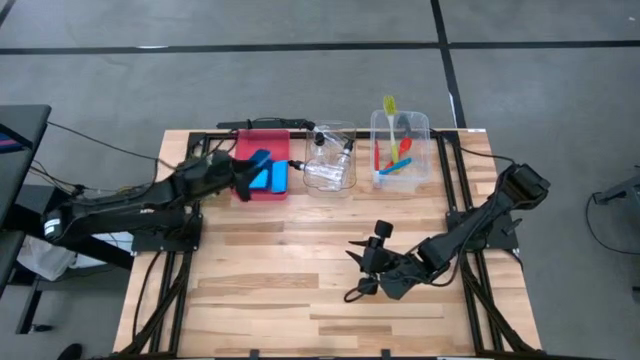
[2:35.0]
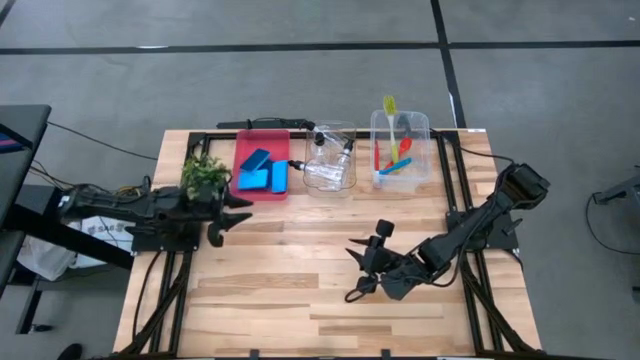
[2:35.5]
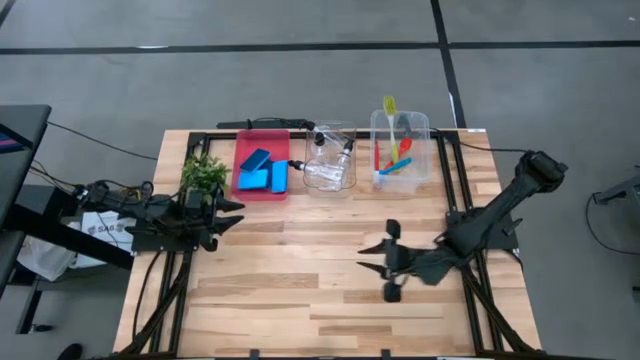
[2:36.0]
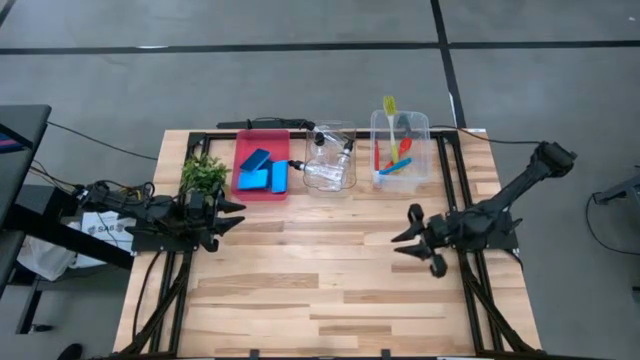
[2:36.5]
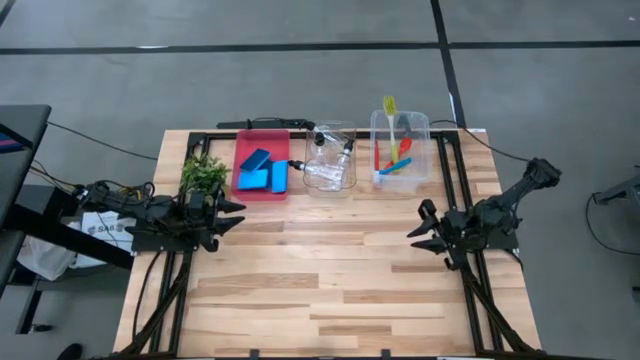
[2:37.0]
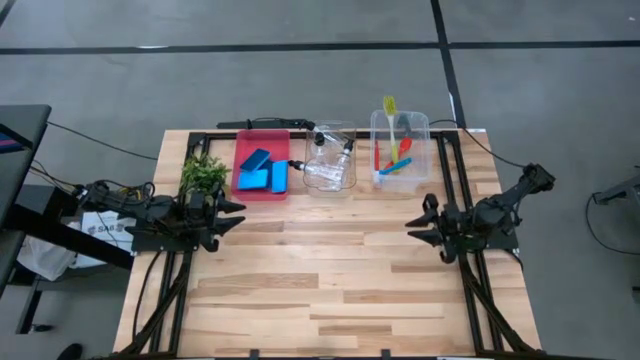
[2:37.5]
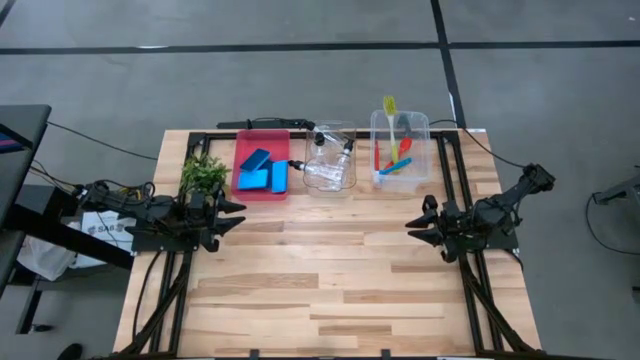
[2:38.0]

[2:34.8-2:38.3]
Task: Pick & Place Kitchen Sink Supplies
Return to Home Position

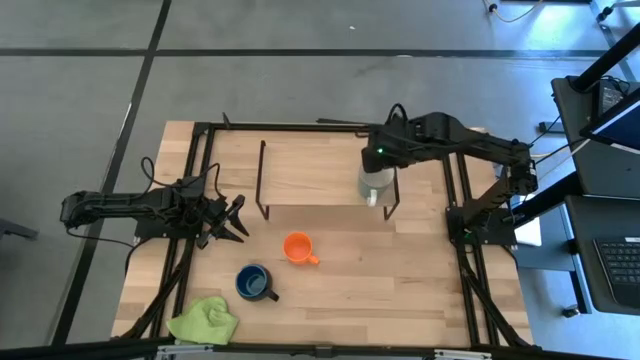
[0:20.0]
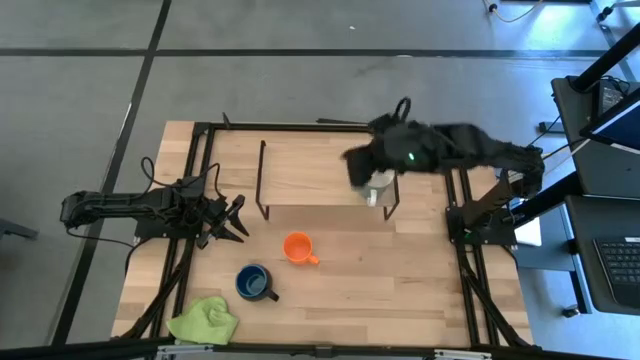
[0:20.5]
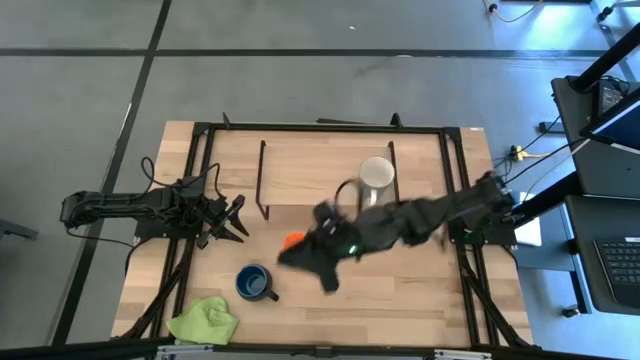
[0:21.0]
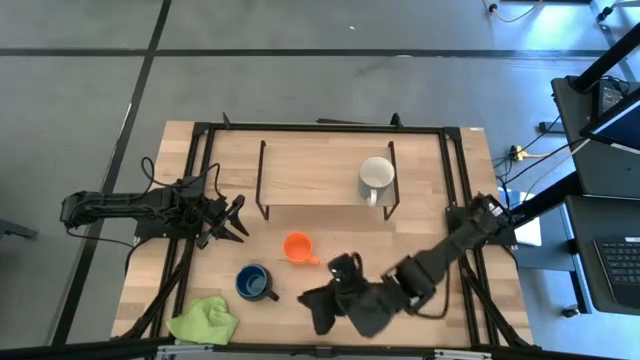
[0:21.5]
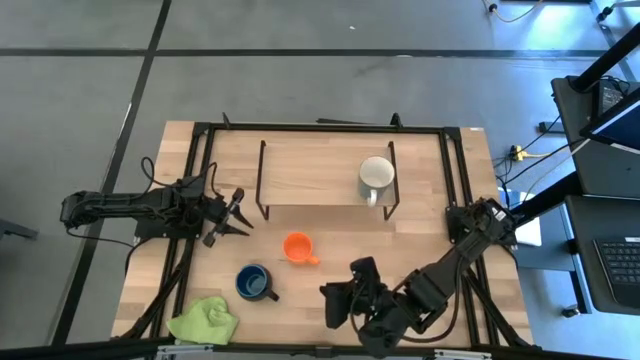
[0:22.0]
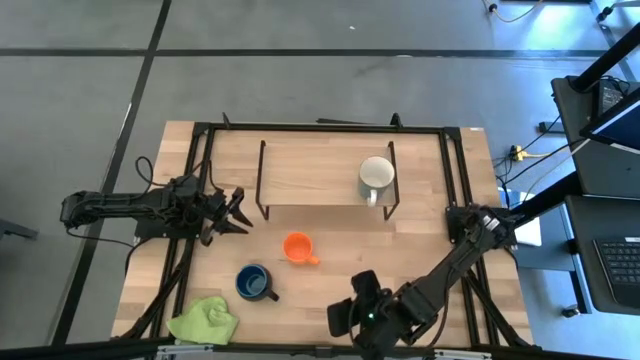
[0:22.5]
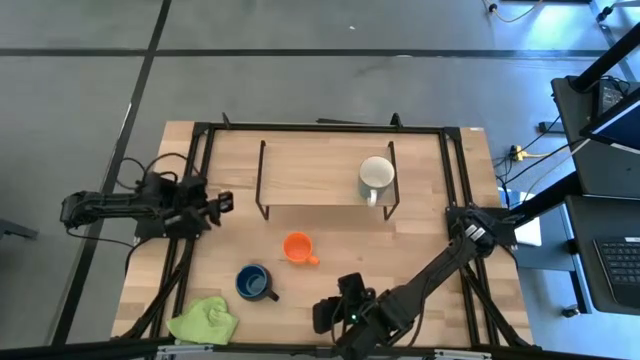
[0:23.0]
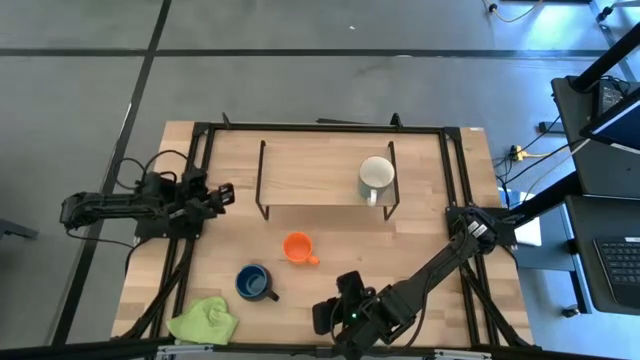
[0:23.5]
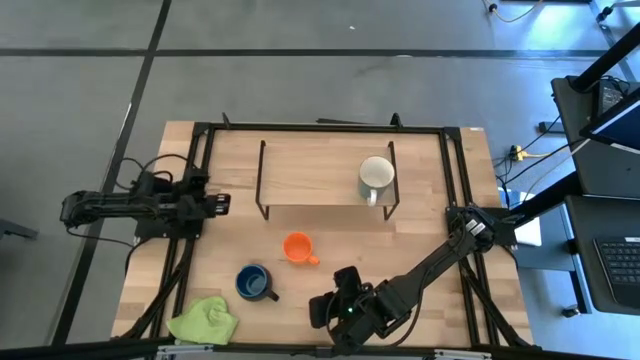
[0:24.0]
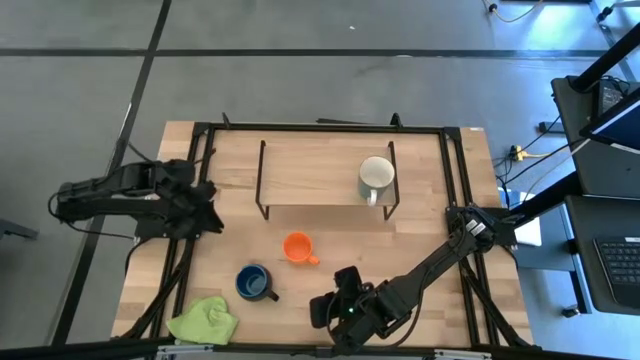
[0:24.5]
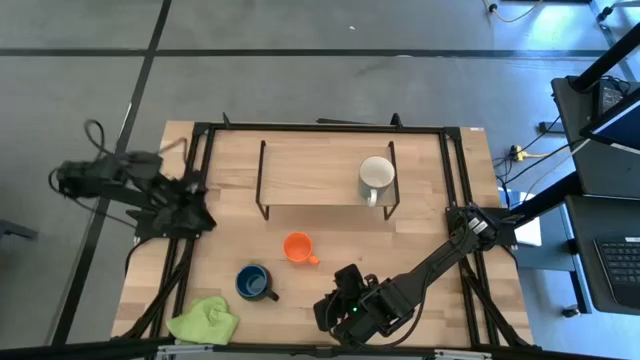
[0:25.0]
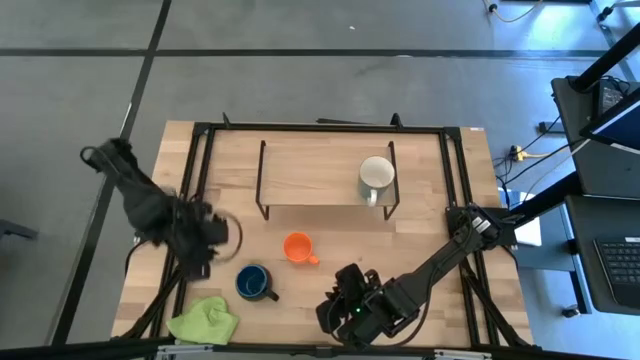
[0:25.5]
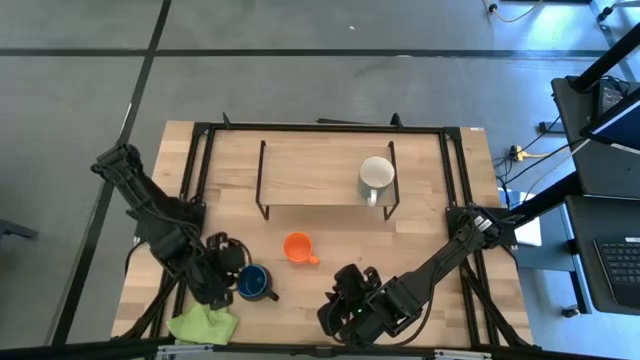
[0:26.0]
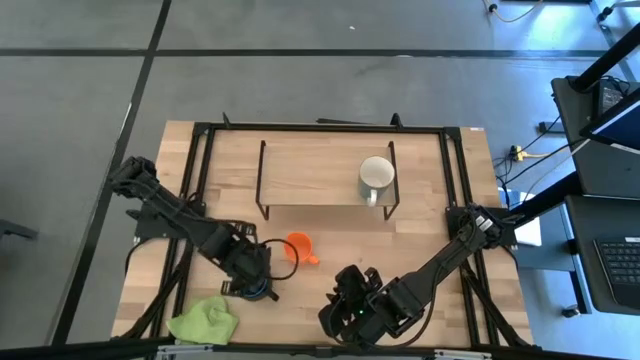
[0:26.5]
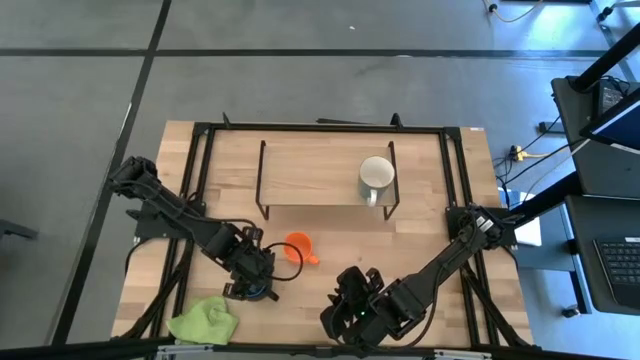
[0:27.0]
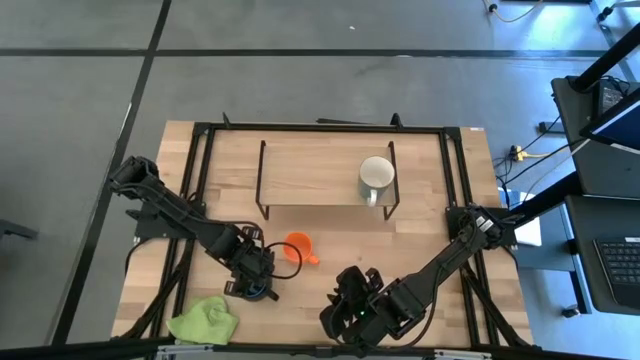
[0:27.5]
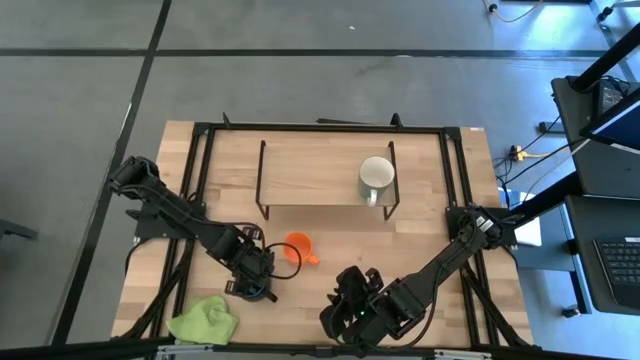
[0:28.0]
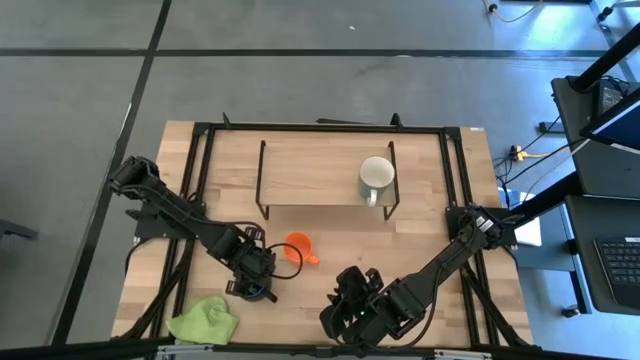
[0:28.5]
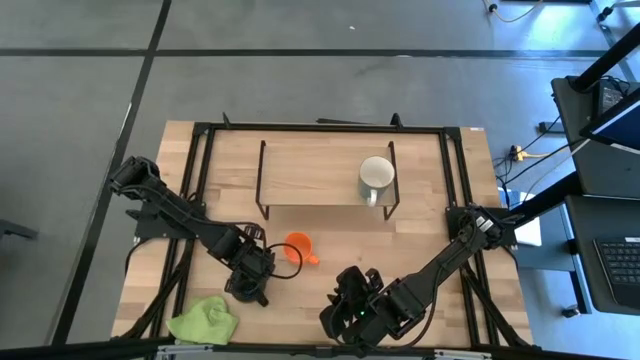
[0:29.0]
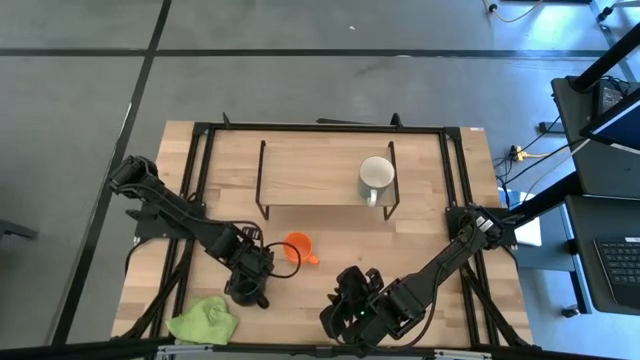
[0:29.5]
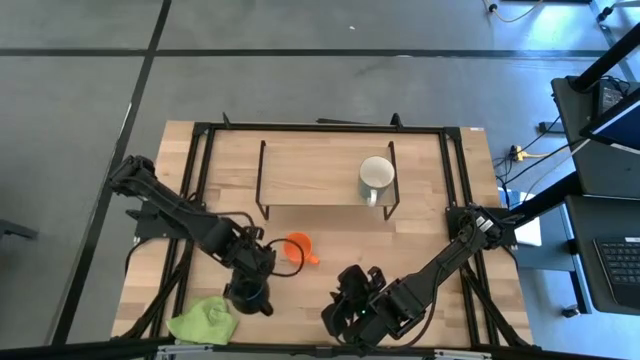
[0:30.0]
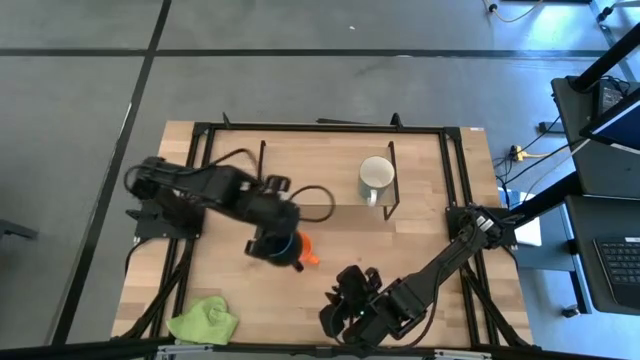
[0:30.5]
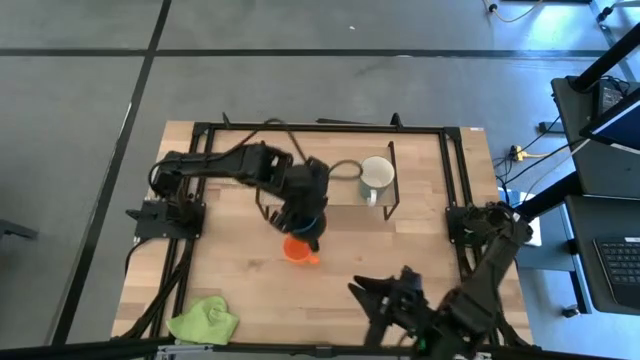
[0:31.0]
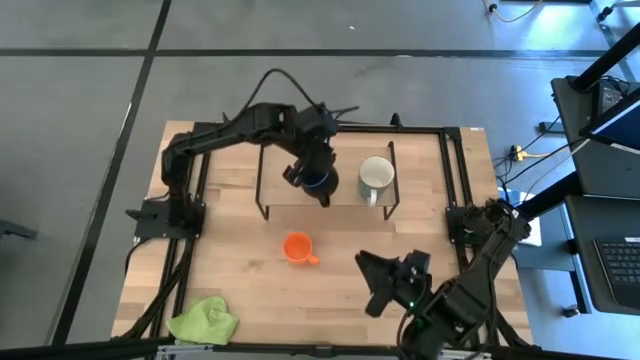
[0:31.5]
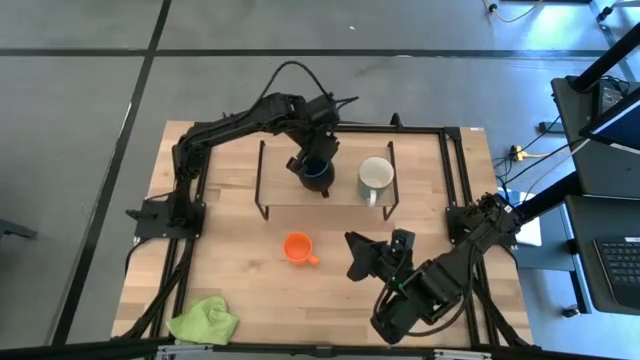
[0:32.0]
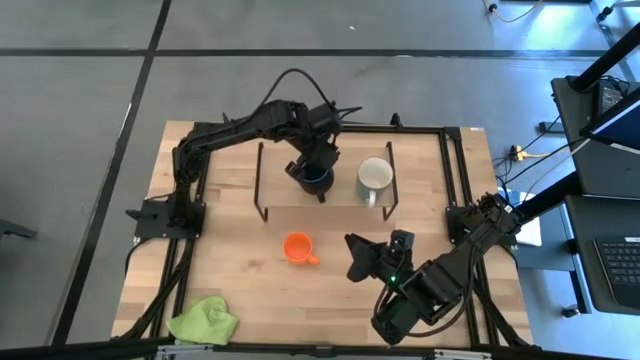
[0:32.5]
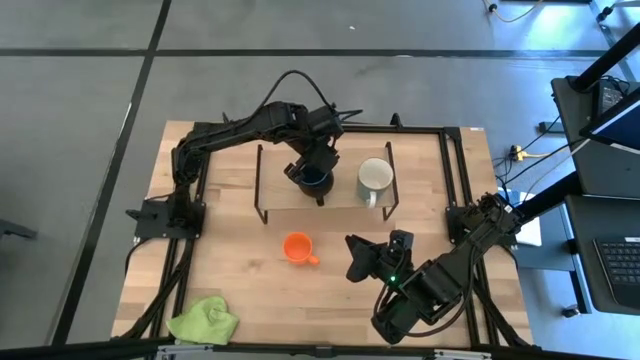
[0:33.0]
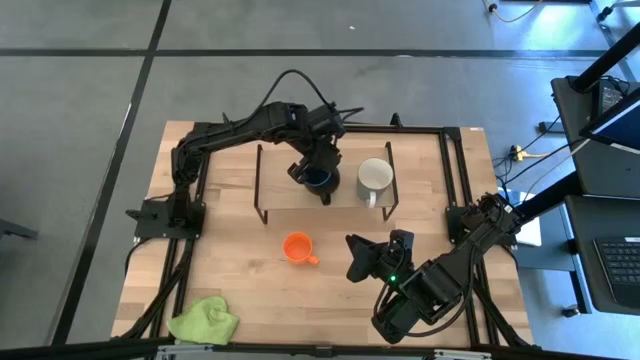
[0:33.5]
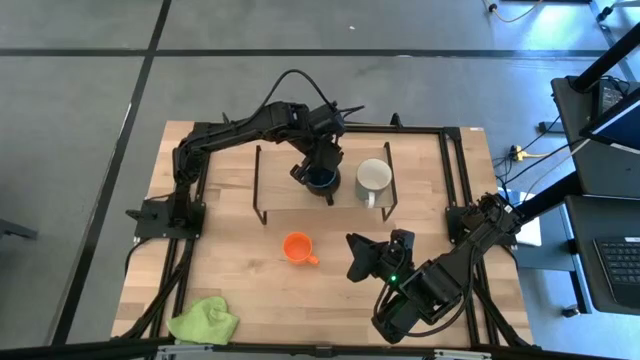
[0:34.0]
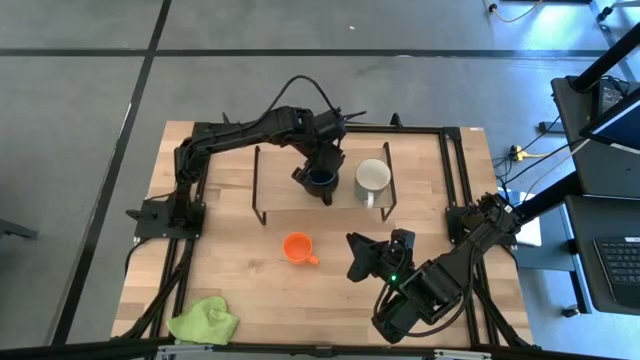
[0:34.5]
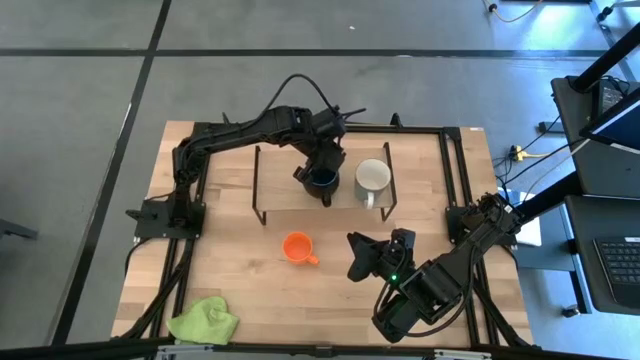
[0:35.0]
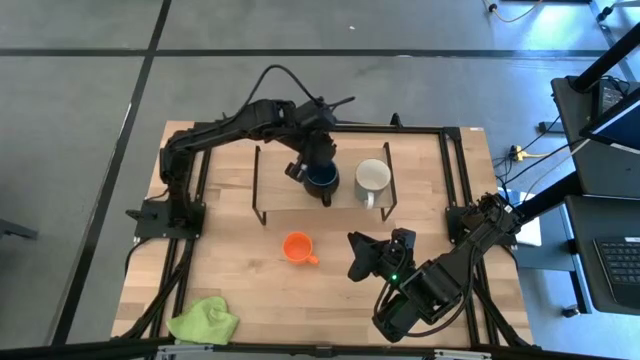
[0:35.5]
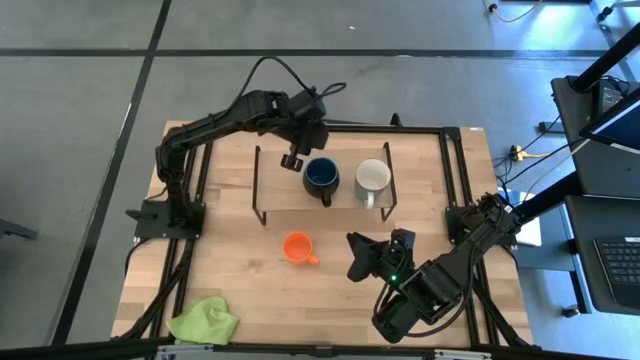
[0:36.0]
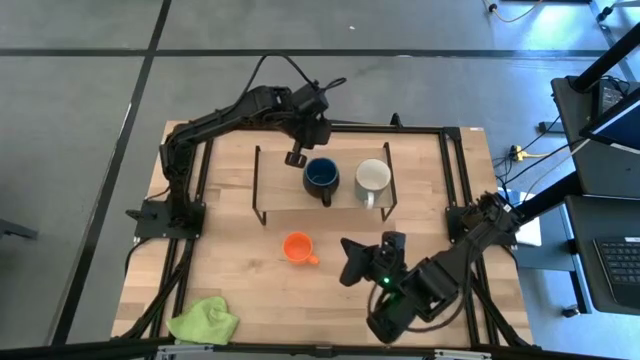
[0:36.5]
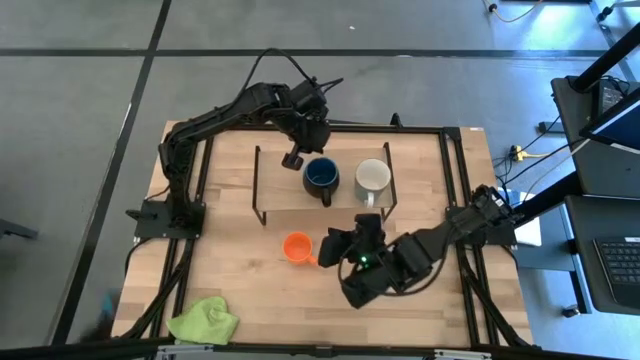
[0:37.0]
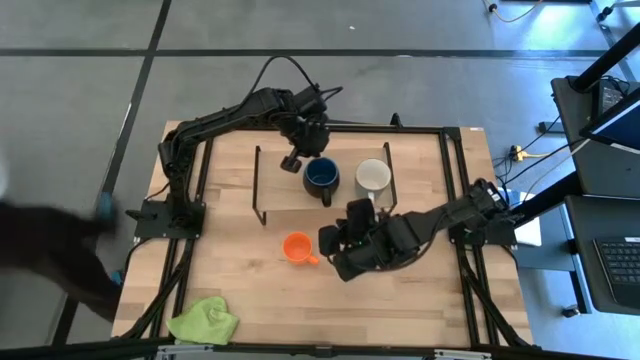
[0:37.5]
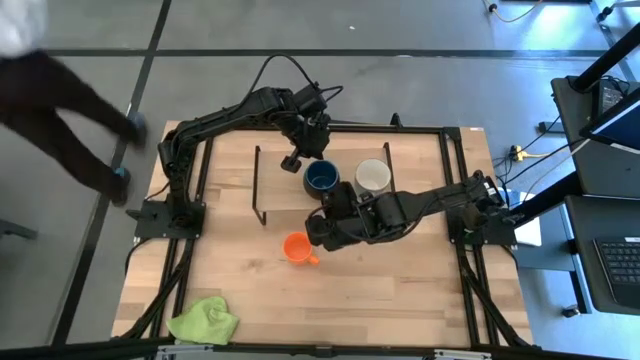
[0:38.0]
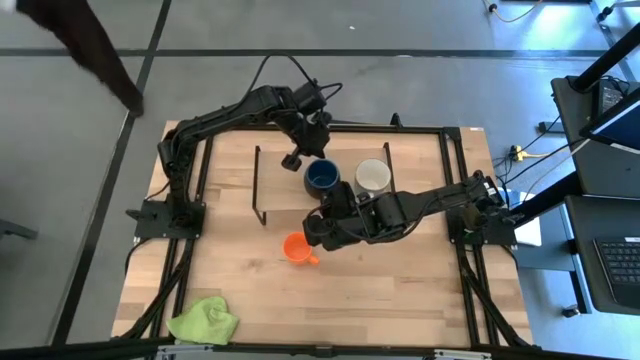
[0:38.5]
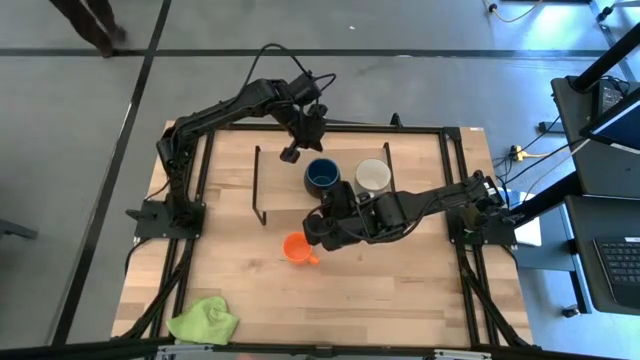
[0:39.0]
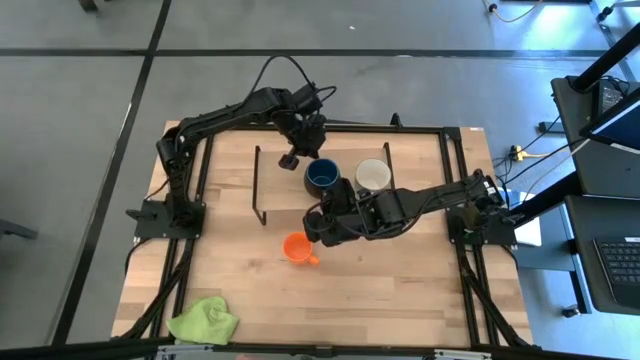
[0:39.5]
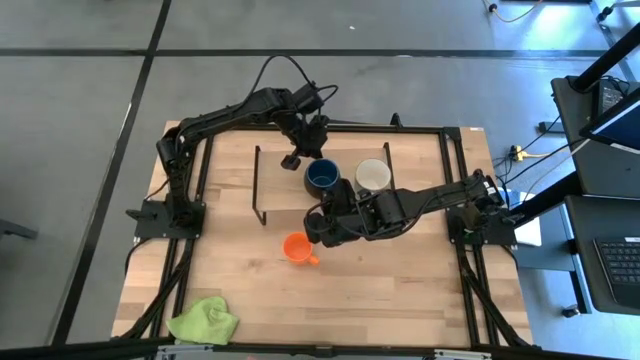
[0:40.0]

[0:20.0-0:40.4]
Task: Stack small to large cups/mugs on shelf
Put the blue mug on the shelf
